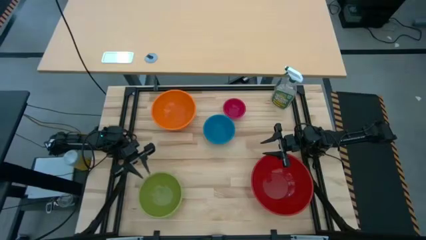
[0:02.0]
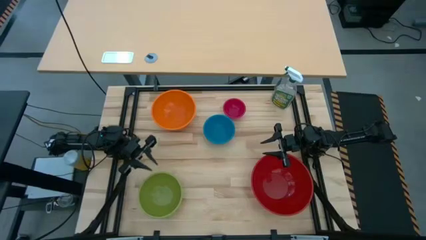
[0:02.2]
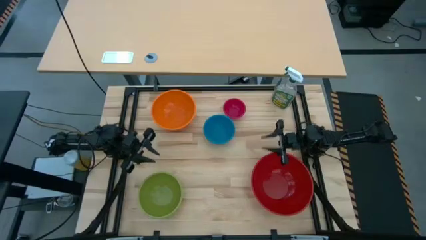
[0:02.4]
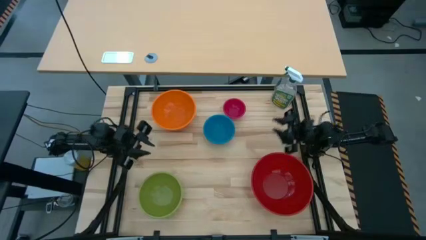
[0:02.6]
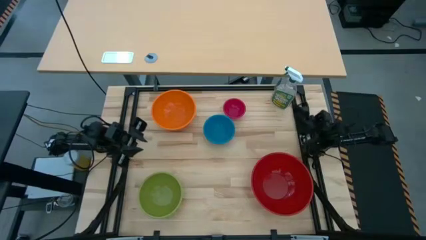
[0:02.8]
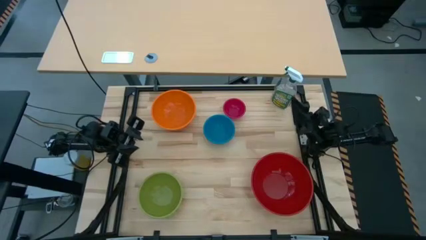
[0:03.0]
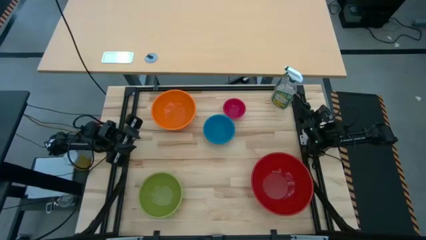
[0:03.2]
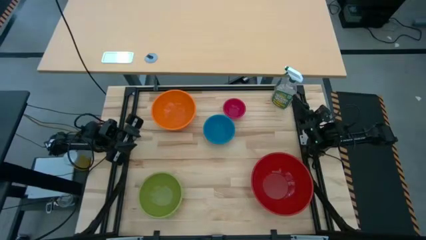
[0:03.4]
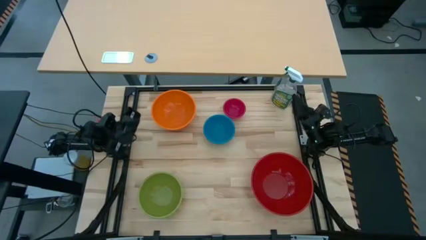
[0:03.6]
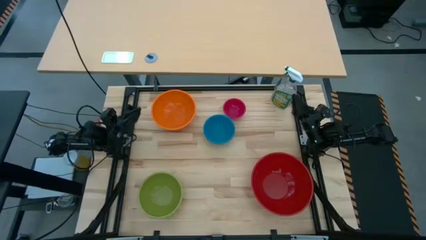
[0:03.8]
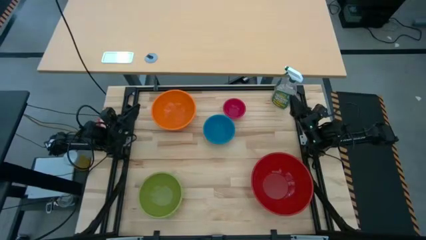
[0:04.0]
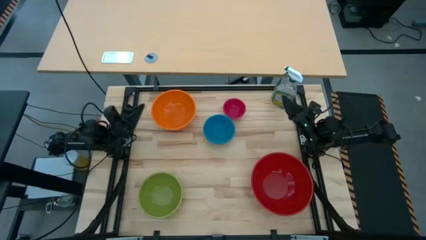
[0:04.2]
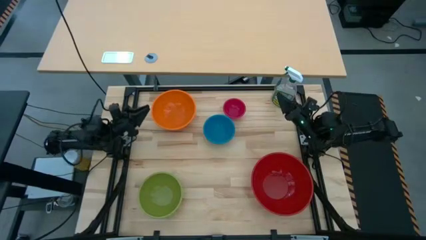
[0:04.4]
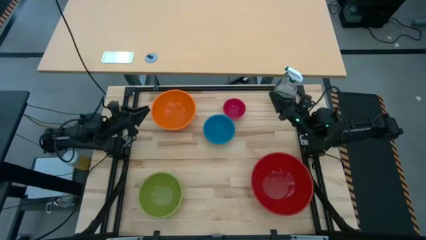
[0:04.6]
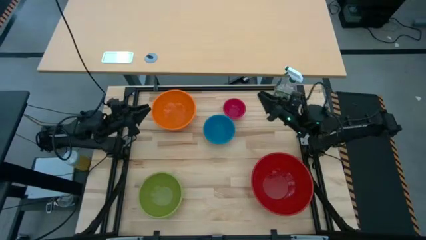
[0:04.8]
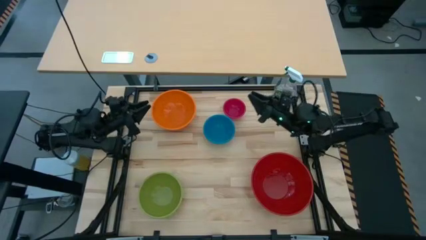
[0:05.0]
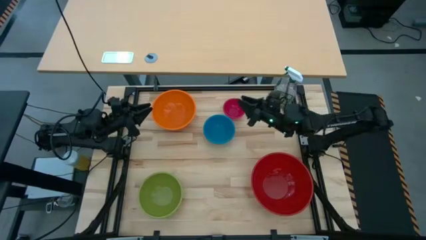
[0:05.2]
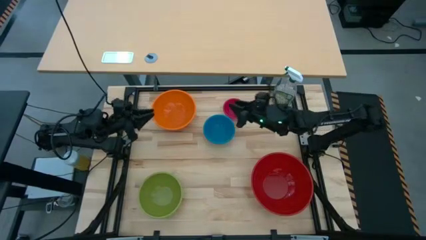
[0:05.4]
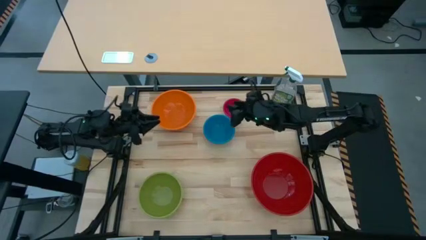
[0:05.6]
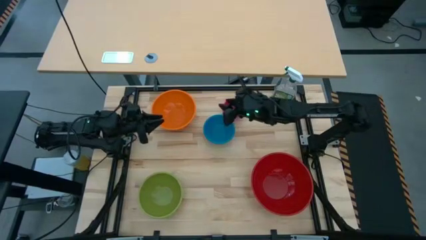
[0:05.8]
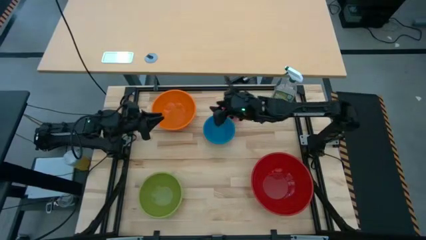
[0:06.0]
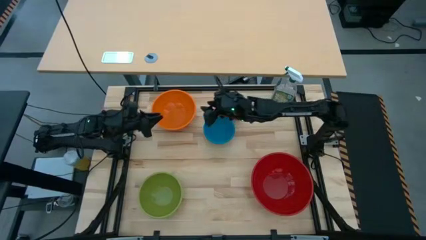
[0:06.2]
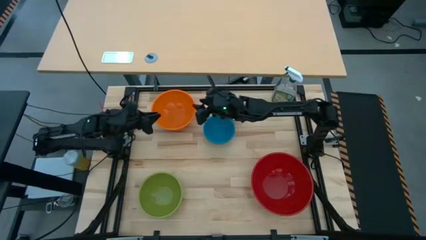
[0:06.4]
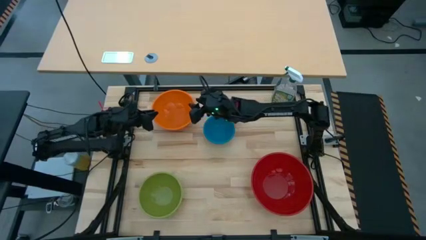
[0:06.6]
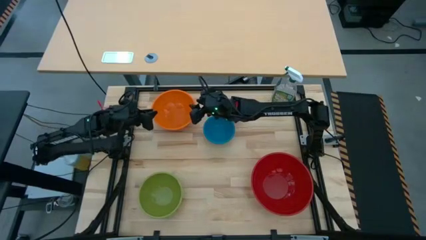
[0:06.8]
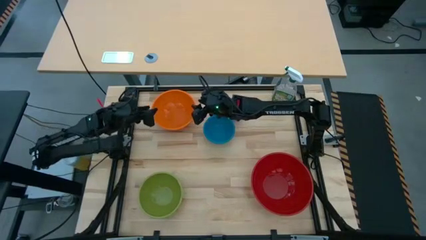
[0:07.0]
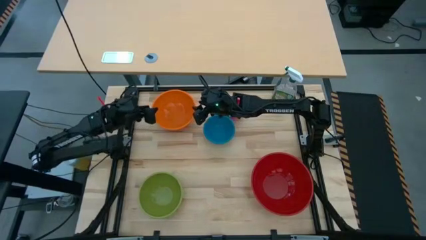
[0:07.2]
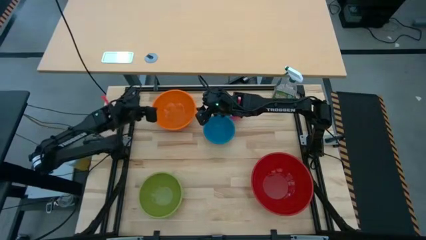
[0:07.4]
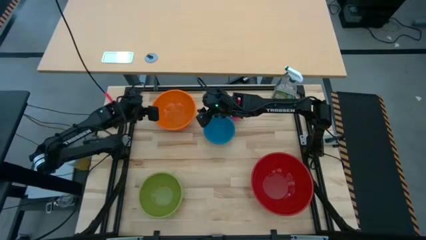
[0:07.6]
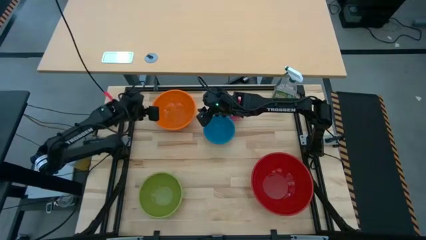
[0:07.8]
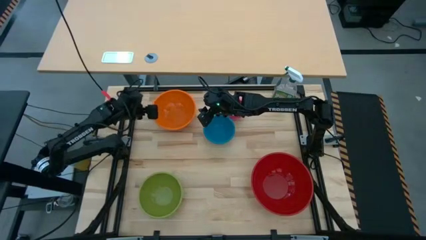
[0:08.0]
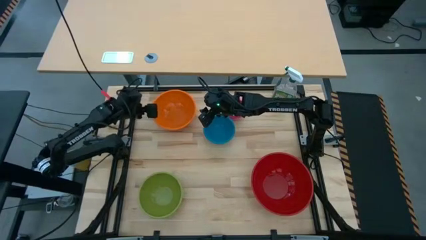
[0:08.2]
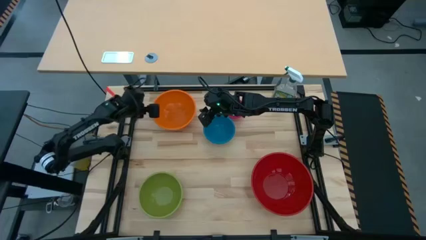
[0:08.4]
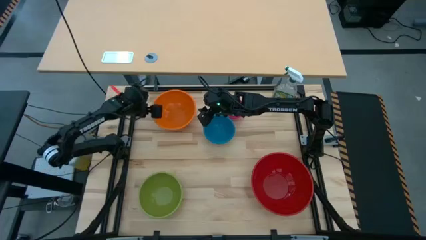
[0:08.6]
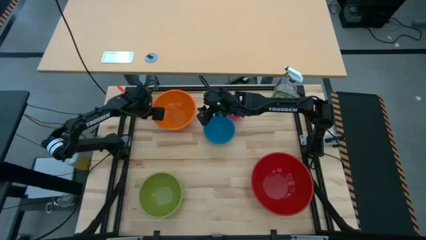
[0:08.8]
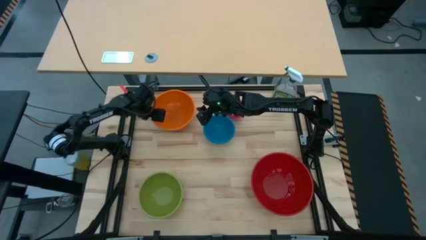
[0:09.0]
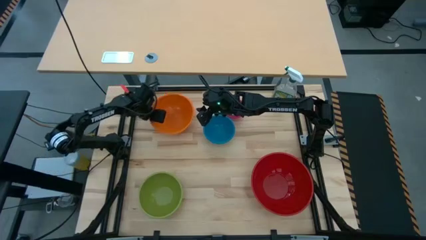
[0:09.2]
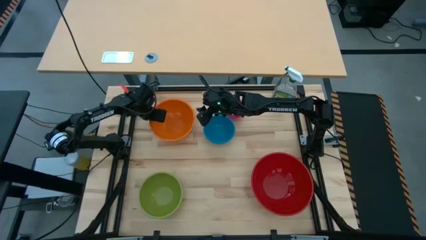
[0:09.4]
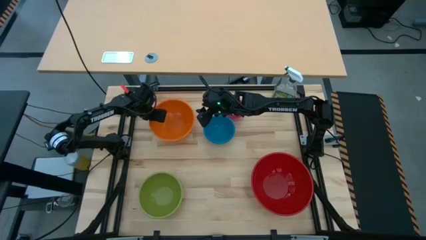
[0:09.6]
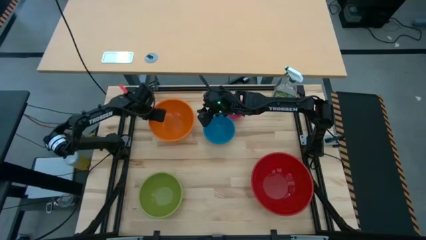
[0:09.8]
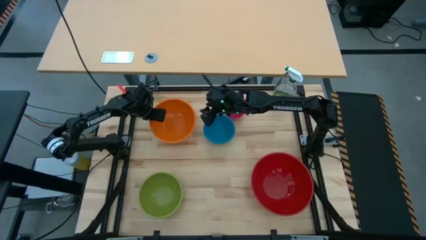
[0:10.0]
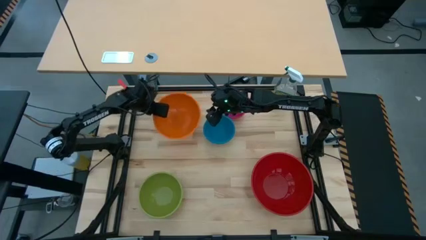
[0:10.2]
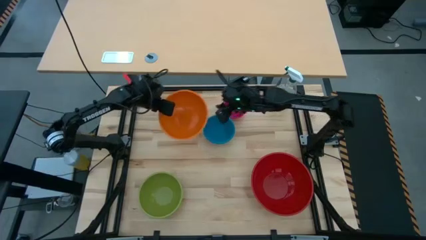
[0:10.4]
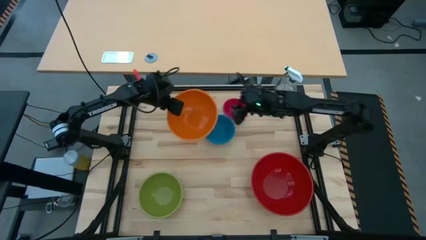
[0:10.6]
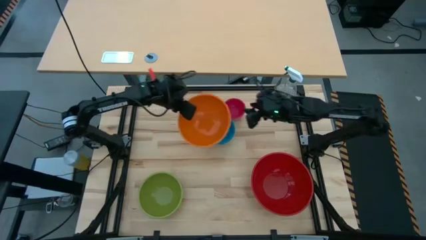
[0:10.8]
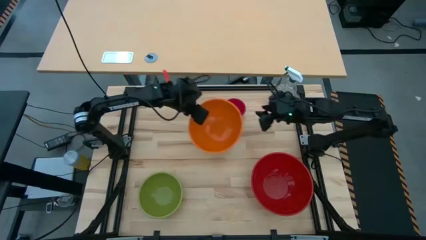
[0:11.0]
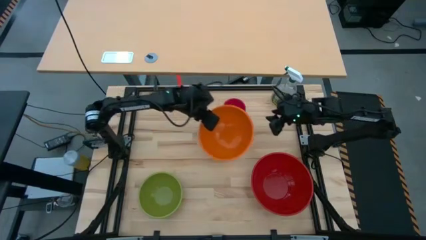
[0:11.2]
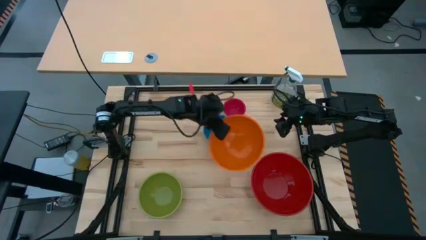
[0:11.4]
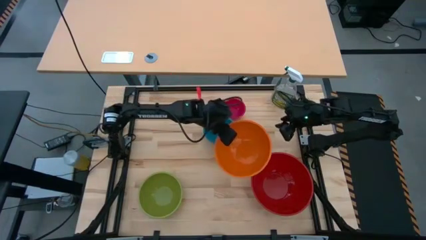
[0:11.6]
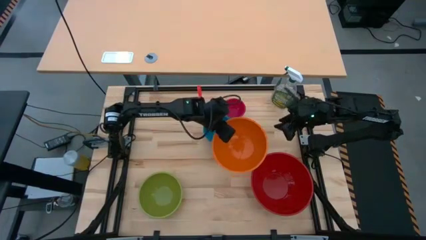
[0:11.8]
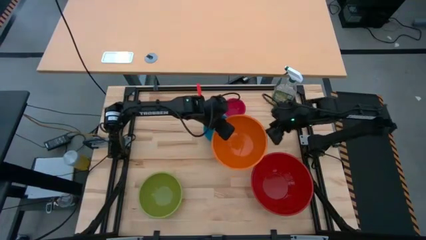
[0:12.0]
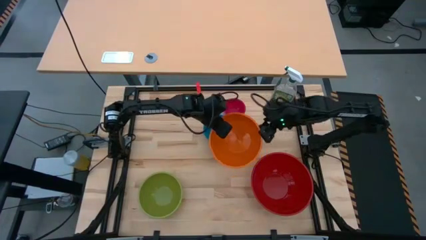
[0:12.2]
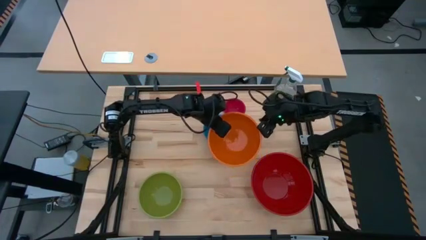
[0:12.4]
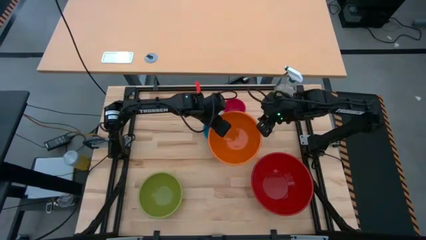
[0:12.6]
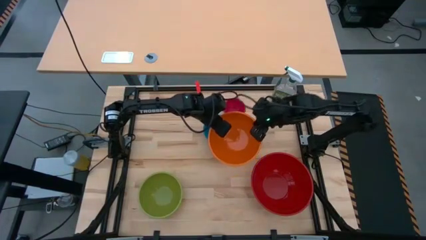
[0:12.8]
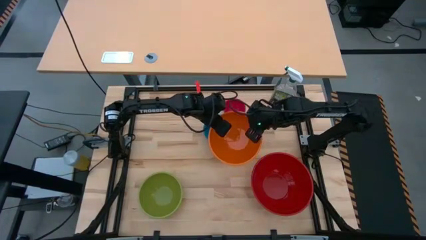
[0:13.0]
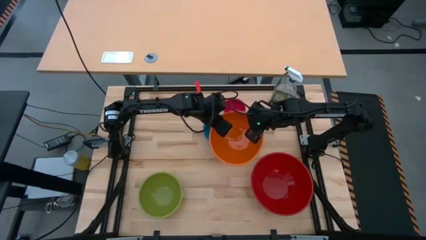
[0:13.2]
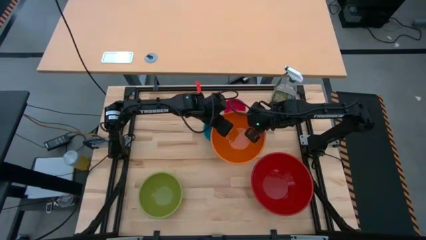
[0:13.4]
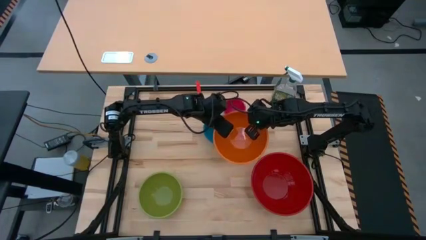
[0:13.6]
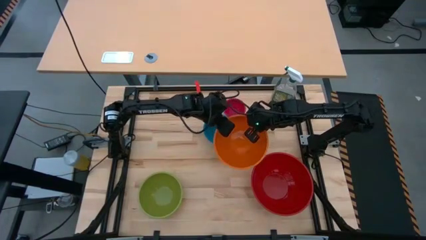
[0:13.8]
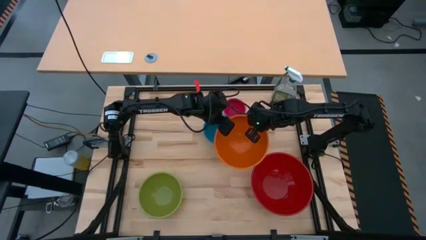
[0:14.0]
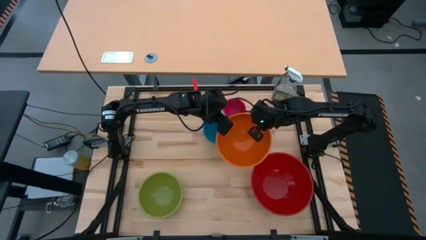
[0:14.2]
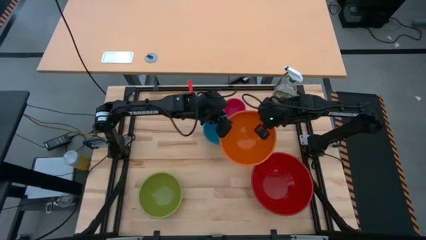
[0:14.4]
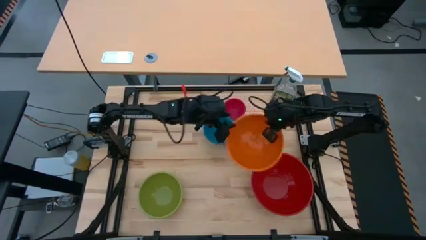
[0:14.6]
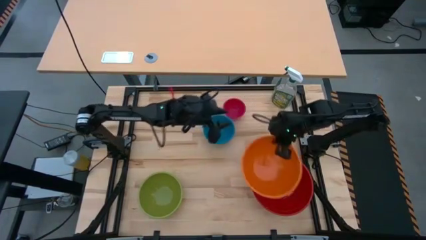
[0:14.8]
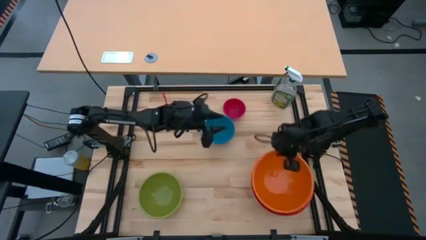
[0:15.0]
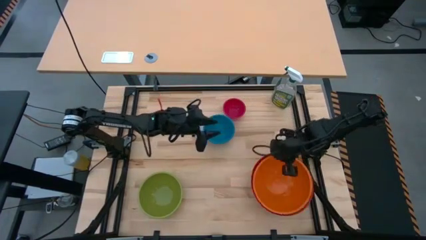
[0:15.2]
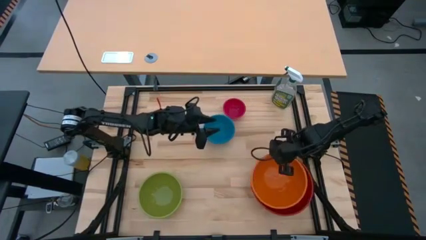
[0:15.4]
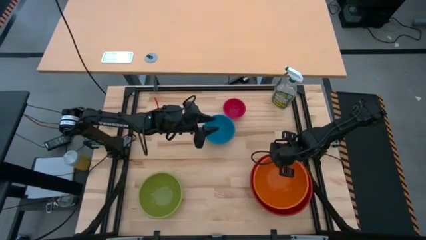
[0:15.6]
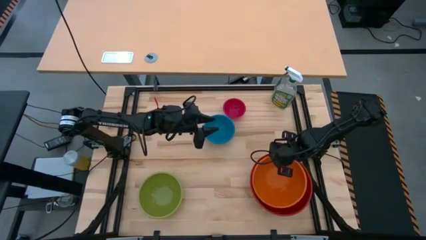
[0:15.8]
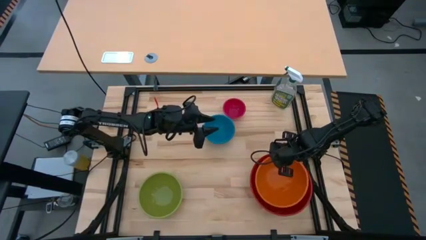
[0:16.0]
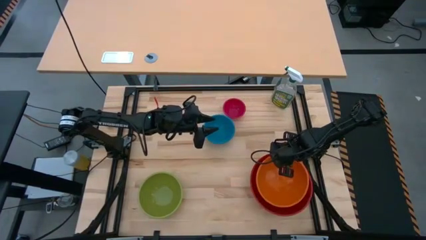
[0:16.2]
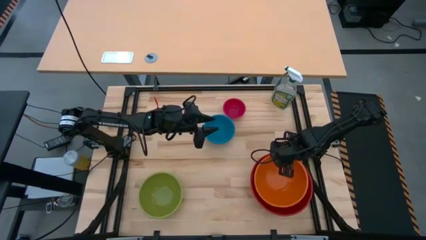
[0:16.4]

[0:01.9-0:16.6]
Stack the orange bowl on top of the red bowl
